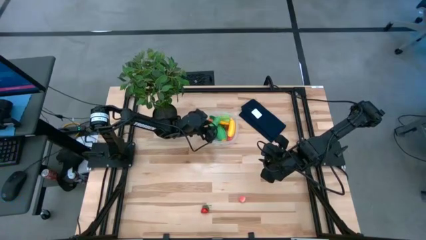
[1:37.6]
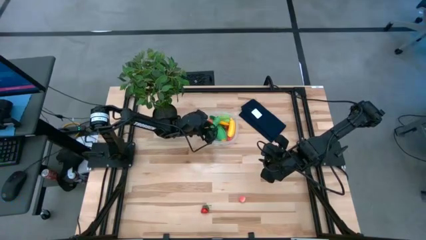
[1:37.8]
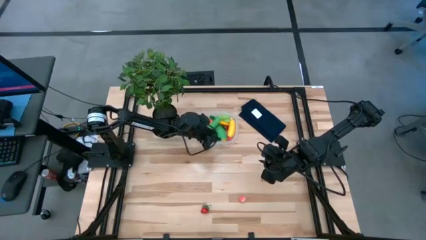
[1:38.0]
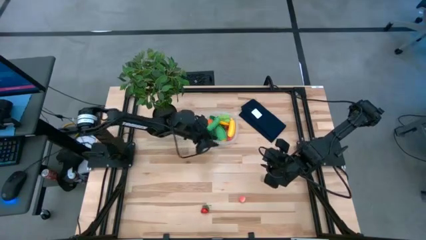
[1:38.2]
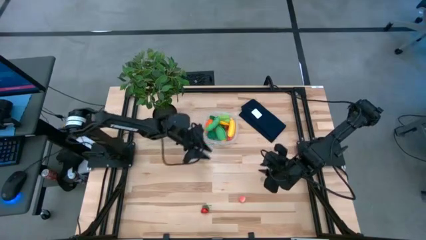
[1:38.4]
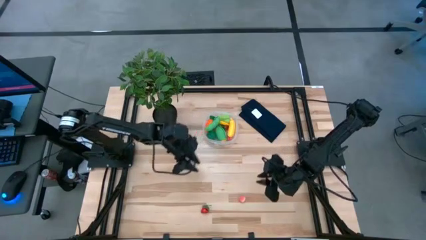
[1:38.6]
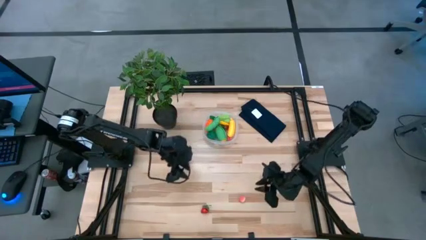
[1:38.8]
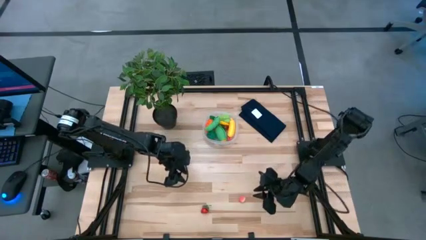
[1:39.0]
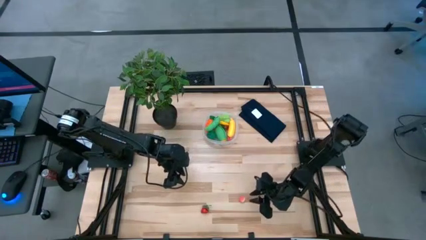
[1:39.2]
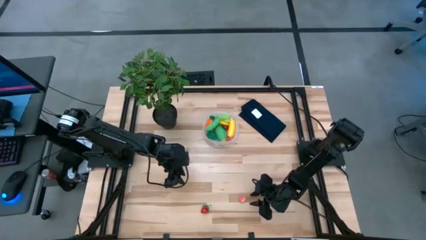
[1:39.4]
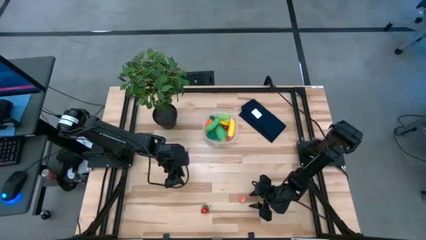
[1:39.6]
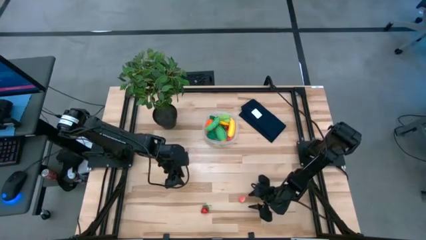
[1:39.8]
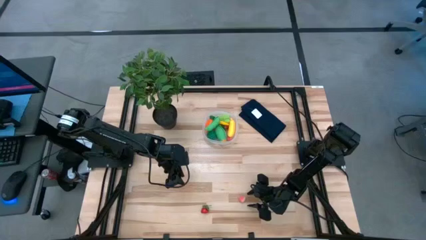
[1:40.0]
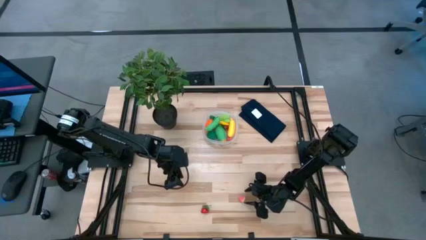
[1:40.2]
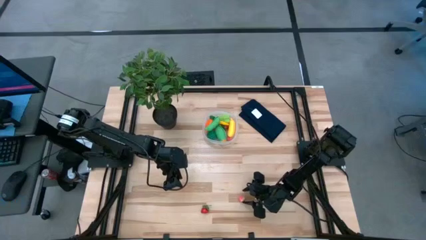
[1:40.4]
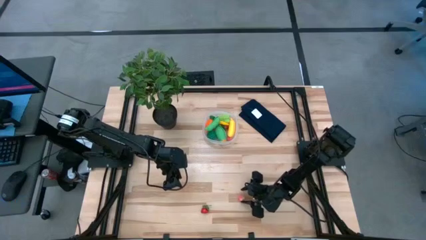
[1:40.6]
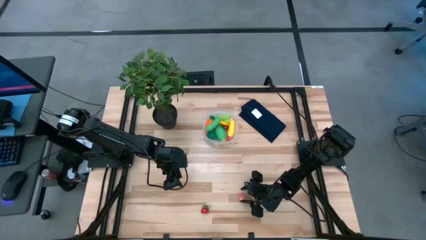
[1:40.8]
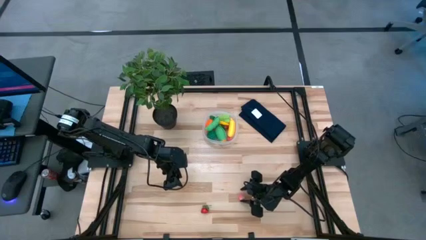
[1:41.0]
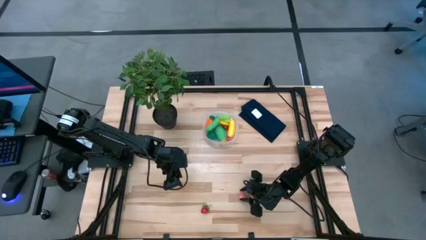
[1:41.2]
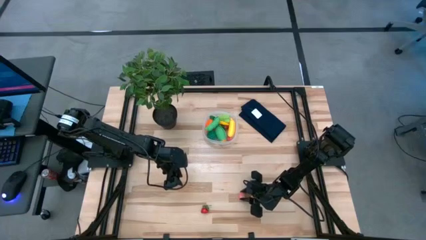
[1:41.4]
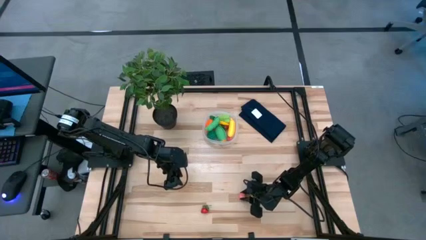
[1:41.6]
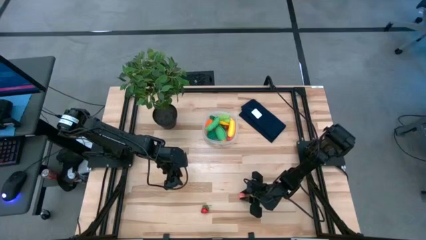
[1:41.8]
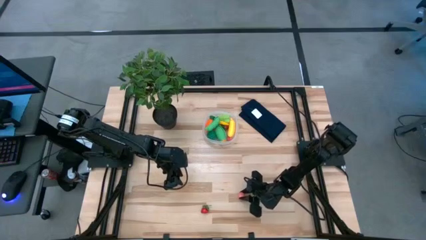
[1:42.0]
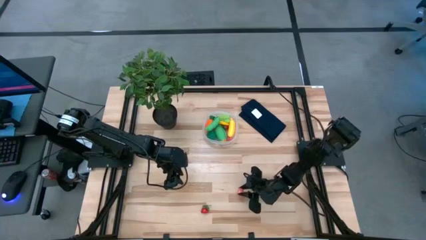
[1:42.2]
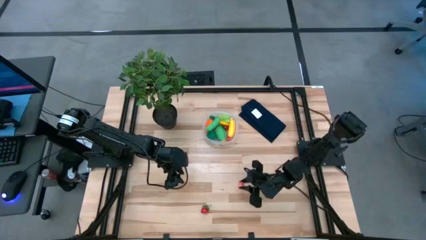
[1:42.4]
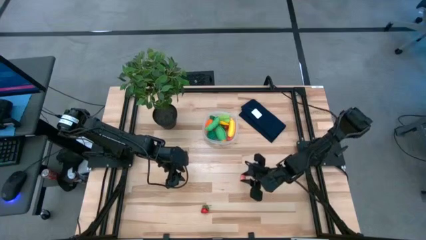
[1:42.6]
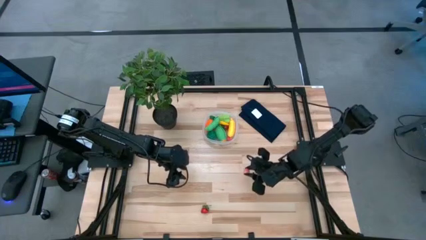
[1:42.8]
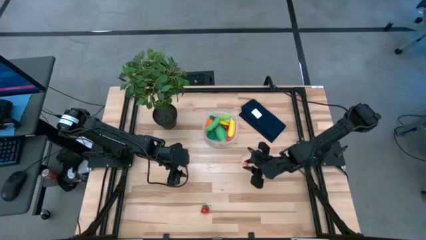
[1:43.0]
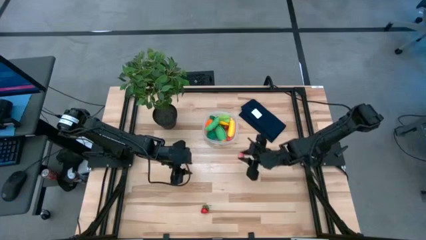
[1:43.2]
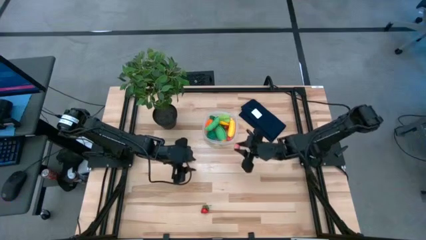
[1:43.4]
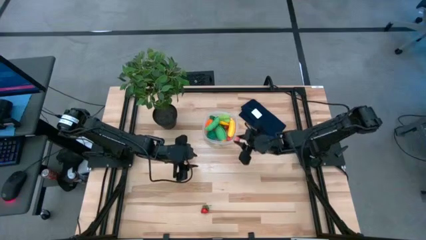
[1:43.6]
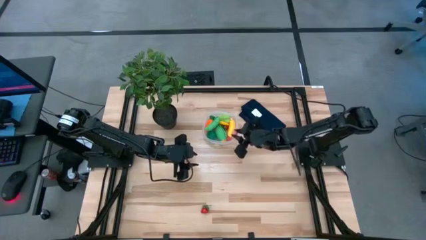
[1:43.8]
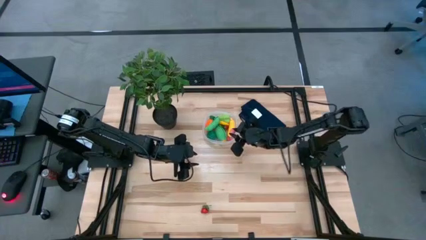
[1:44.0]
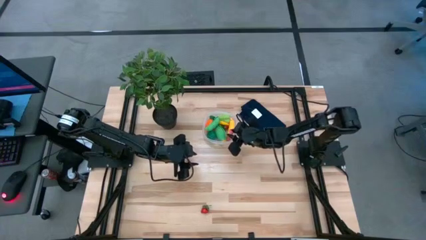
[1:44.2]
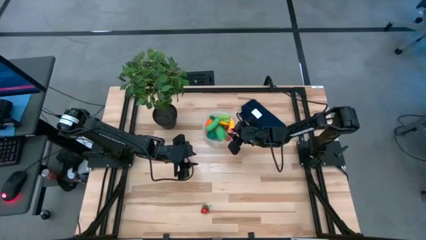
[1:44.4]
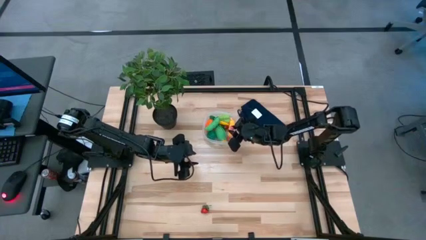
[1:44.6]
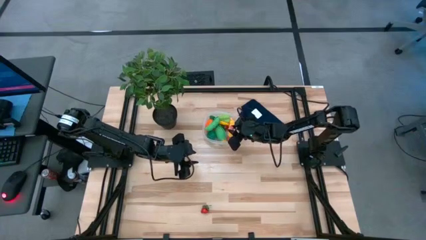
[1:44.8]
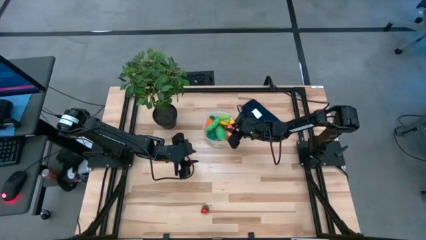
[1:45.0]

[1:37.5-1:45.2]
Task: Pick and placing Produce into tupperware
Put the pink peach into the transparent bin

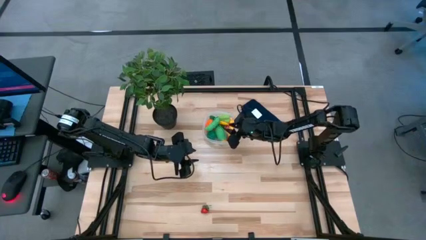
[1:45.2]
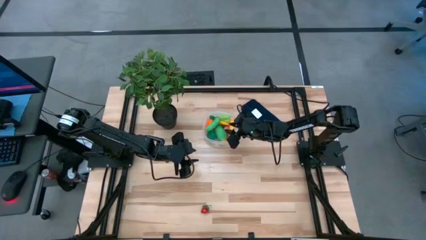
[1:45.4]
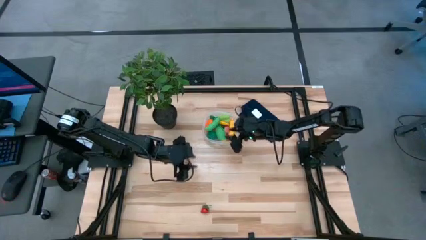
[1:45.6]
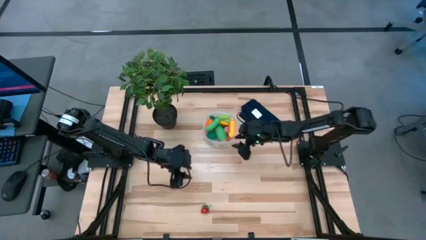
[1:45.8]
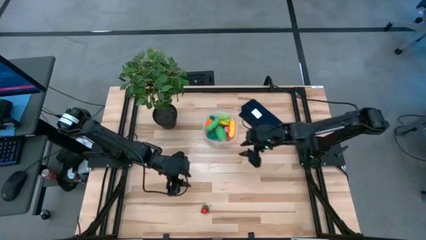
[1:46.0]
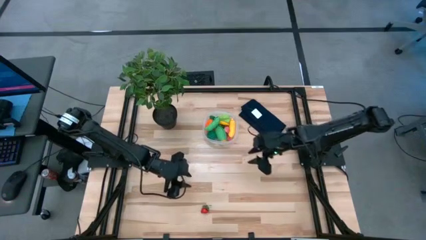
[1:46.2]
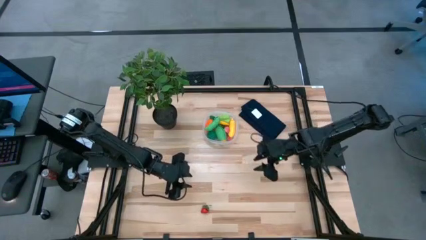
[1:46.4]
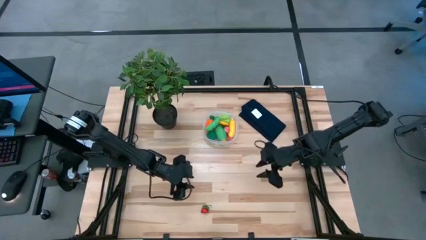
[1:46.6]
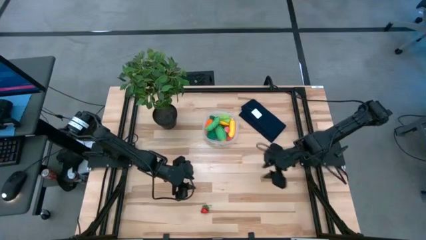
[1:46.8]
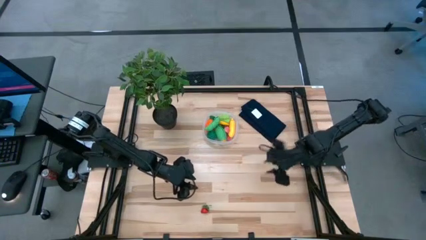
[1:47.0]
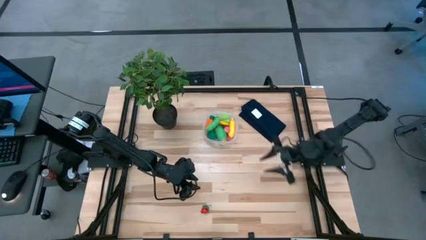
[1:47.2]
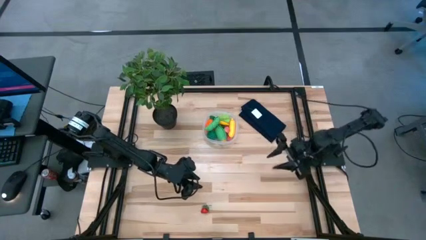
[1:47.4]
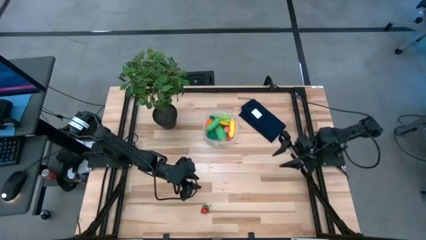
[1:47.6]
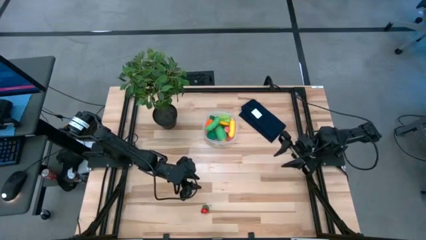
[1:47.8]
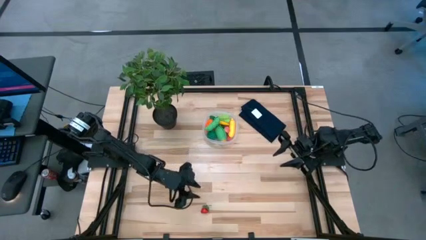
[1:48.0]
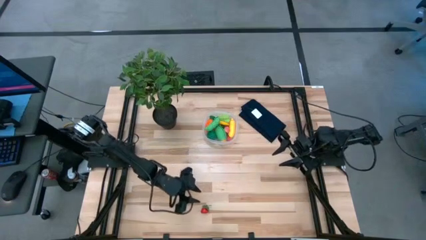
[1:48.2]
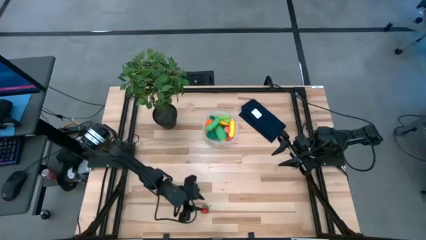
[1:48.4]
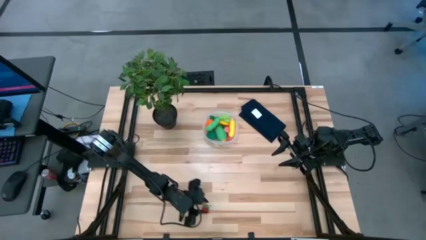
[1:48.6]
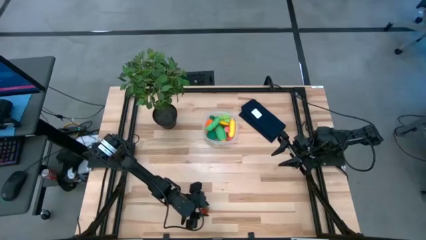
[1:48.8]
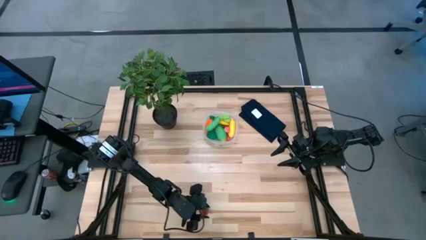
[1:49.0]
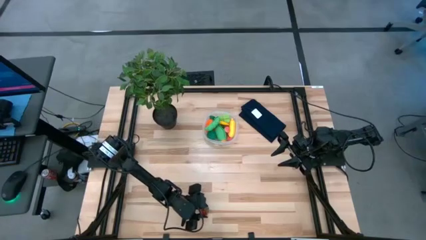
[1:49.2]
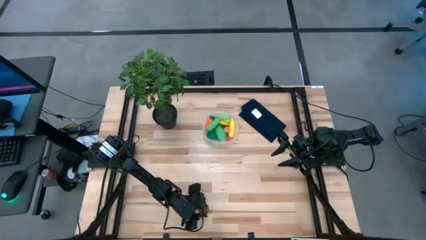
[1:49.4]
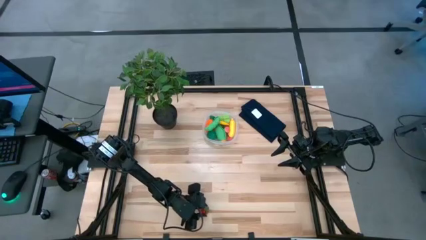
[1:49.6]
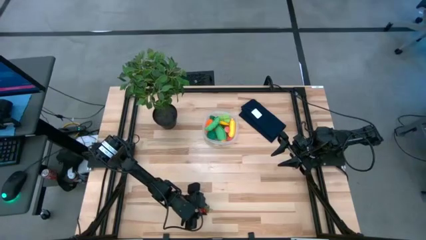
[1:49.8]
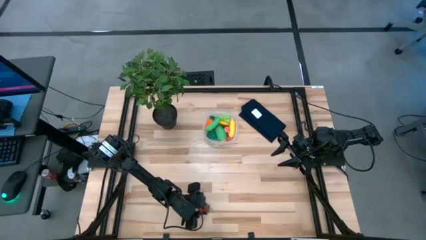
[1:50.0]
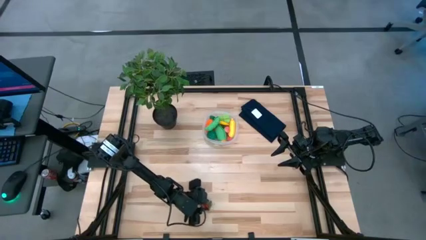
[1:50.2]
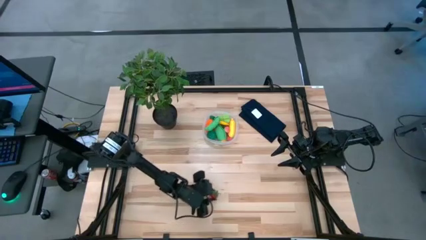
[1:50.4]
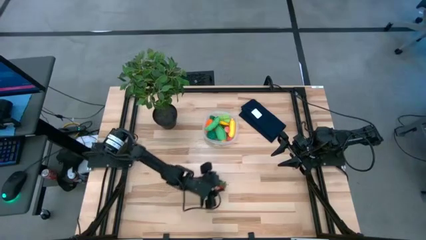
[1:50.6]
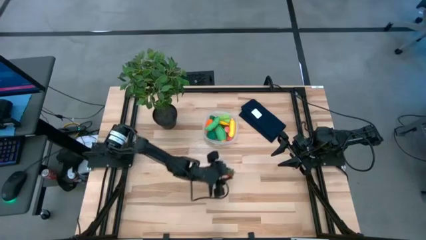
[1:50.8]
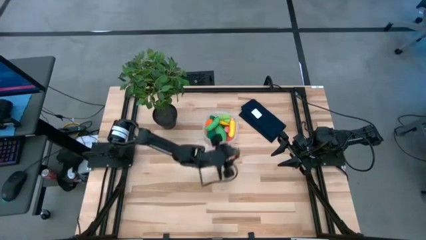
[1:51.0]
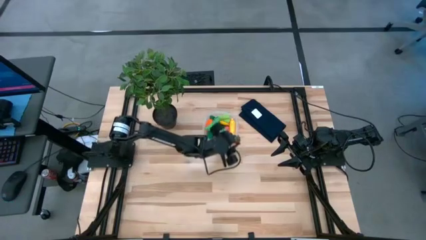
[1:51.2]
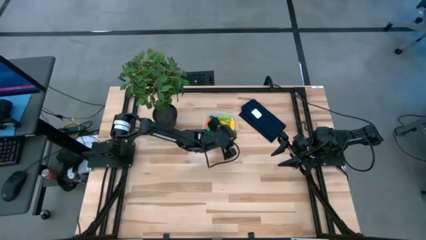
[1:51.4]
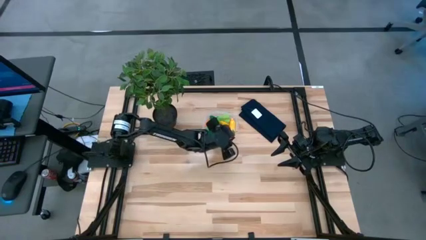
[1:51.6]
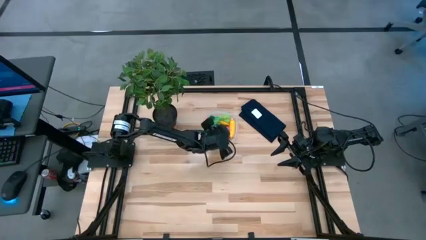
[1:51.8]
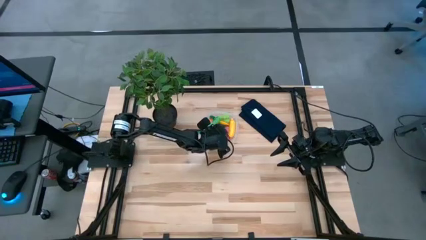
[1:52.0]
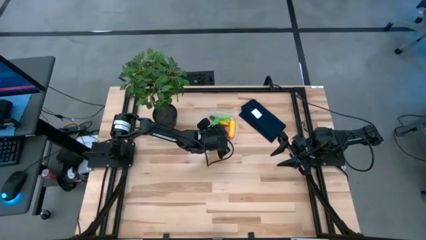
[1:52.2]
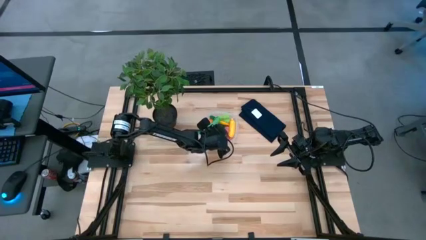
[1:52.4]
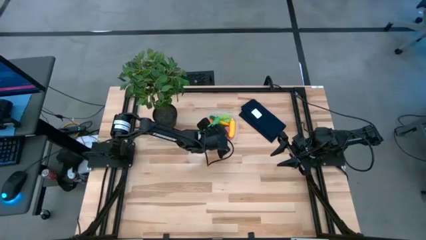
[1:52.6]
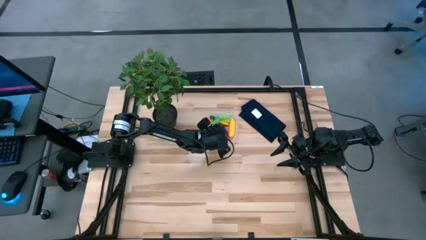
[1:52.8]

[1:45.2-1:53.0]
Put the red strawberry into the transparent bin
